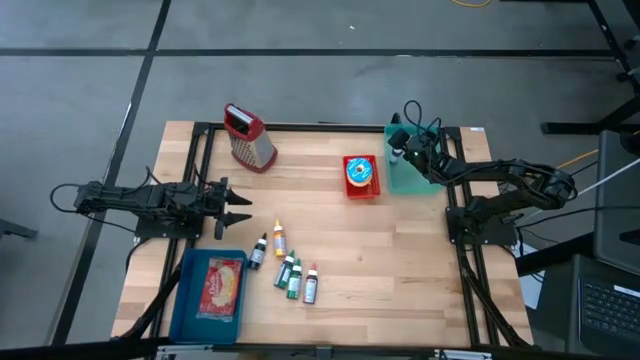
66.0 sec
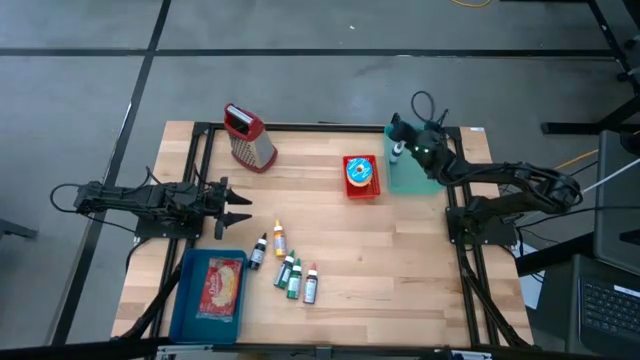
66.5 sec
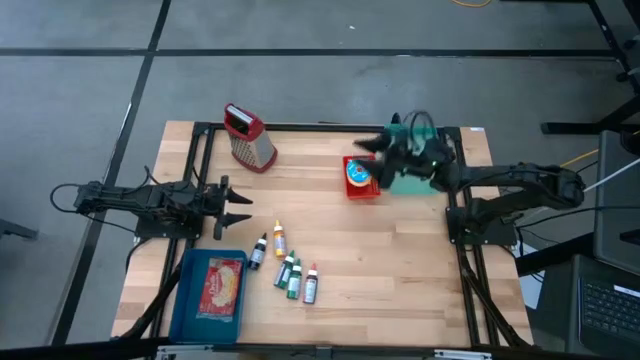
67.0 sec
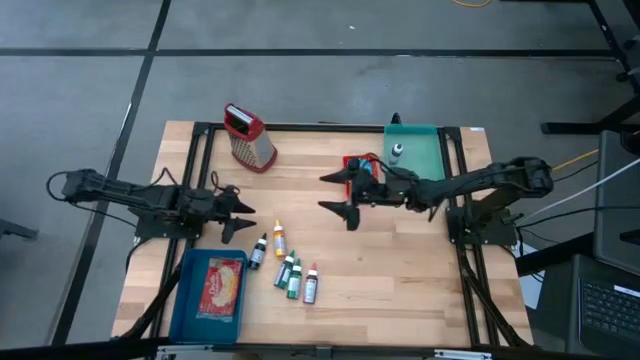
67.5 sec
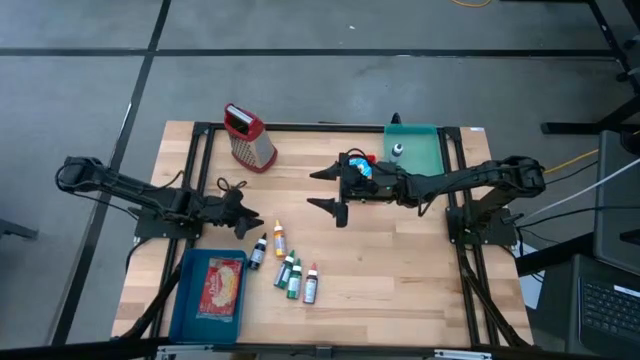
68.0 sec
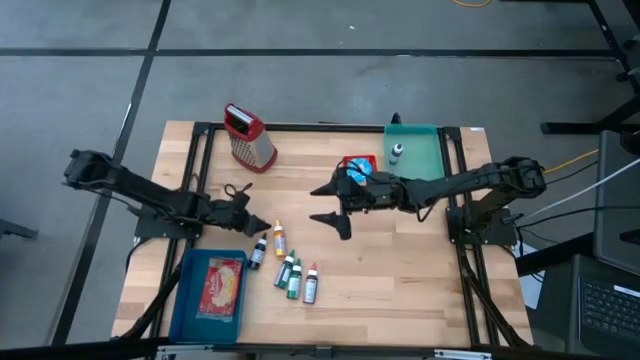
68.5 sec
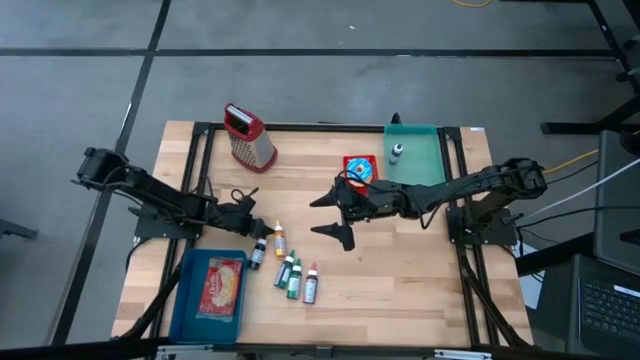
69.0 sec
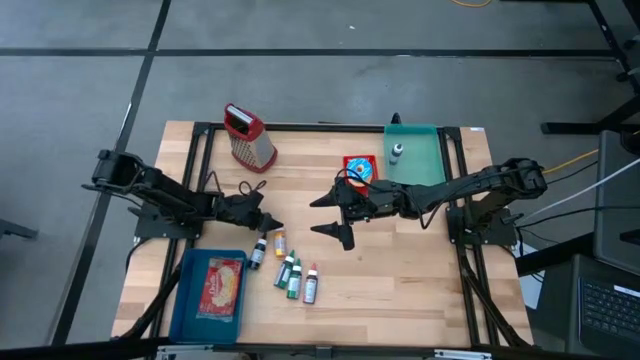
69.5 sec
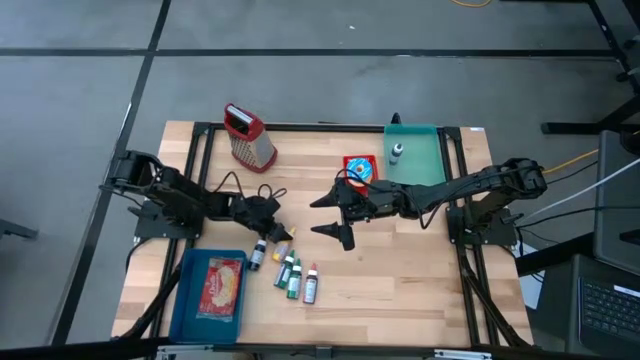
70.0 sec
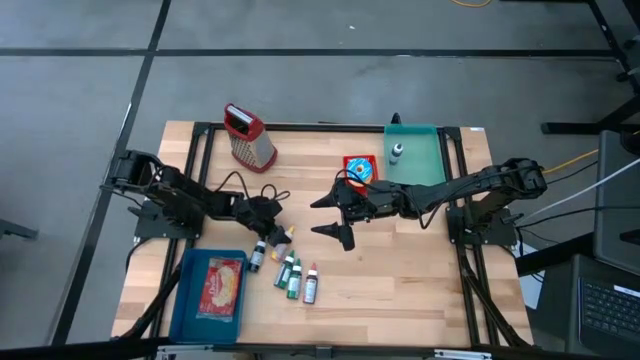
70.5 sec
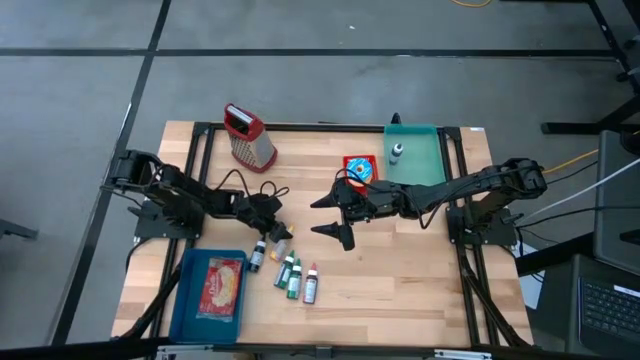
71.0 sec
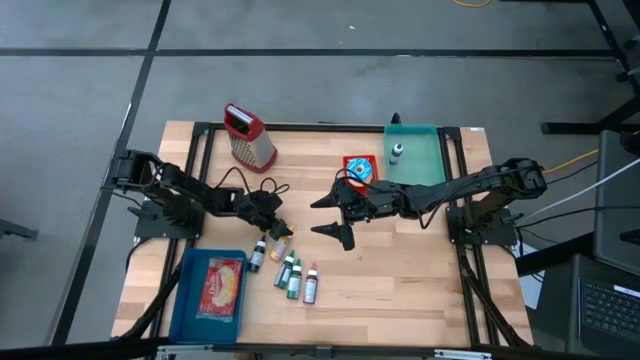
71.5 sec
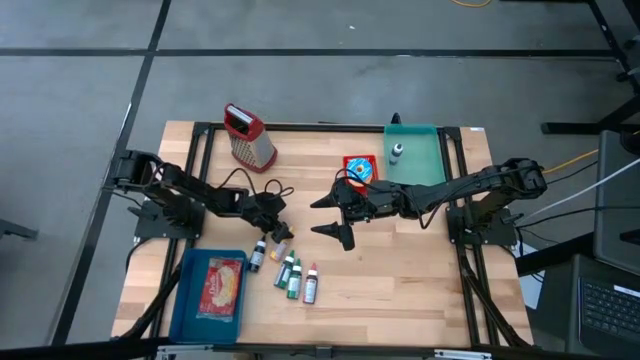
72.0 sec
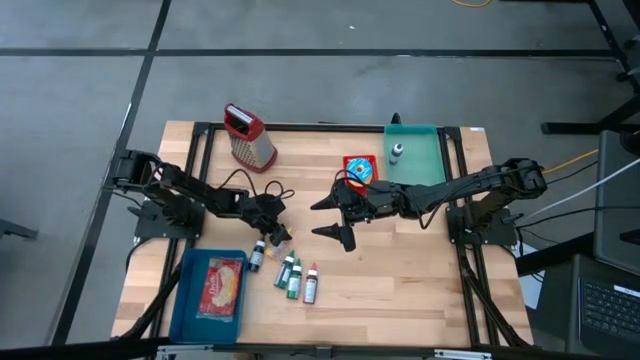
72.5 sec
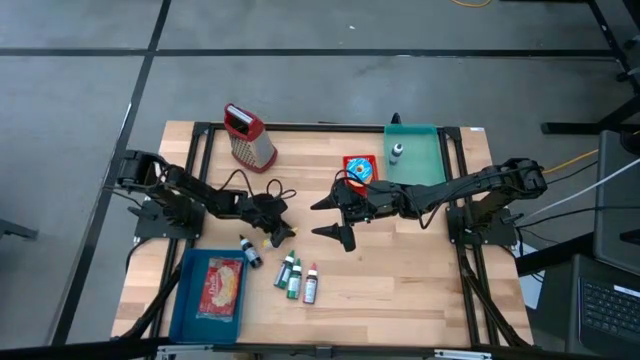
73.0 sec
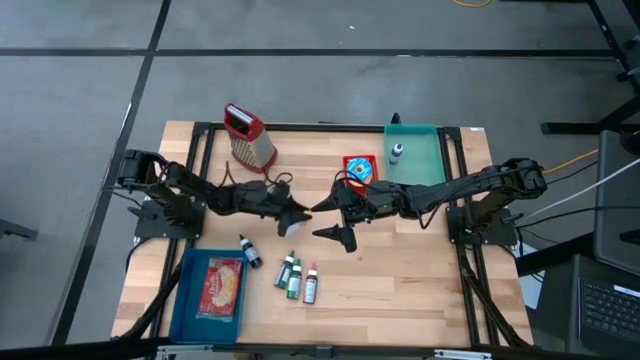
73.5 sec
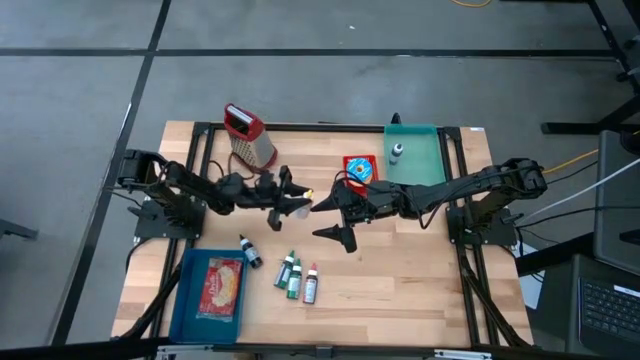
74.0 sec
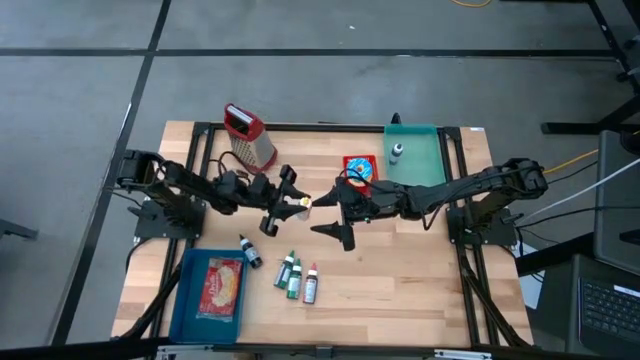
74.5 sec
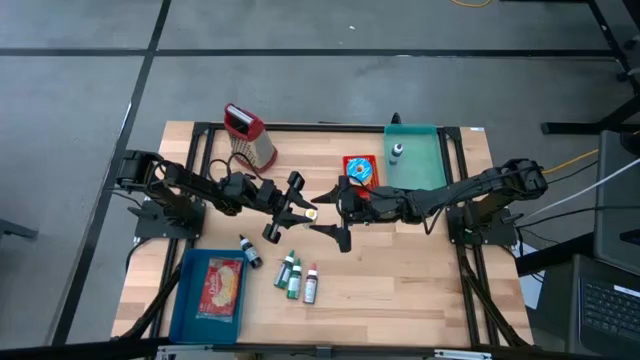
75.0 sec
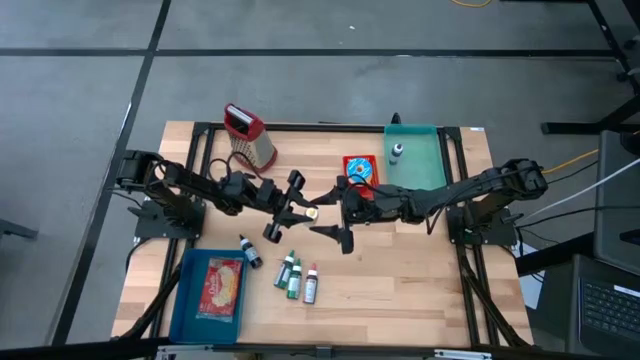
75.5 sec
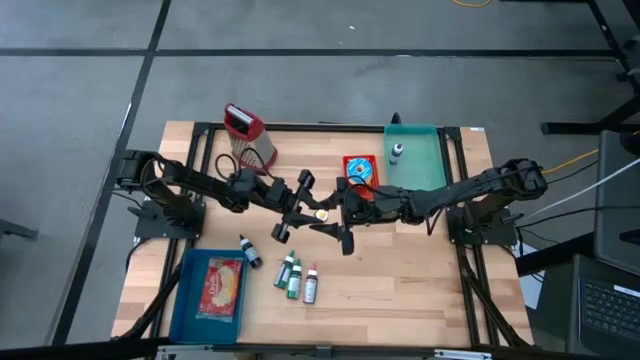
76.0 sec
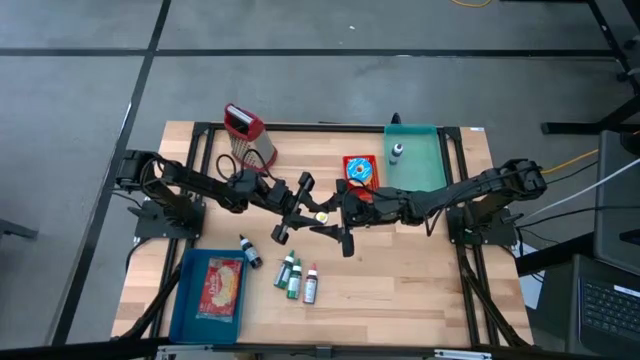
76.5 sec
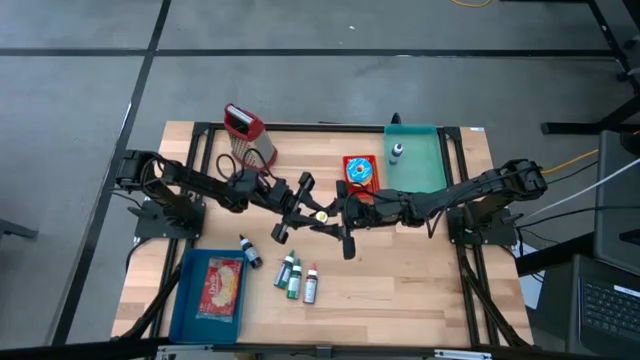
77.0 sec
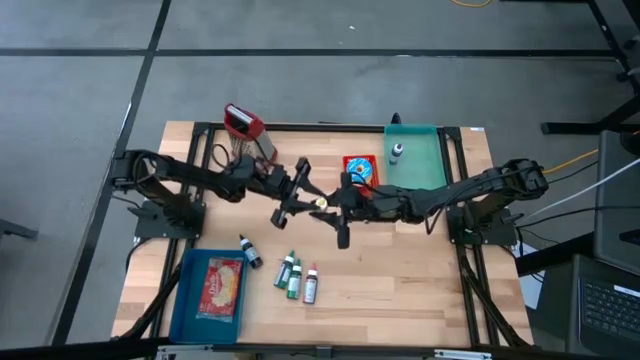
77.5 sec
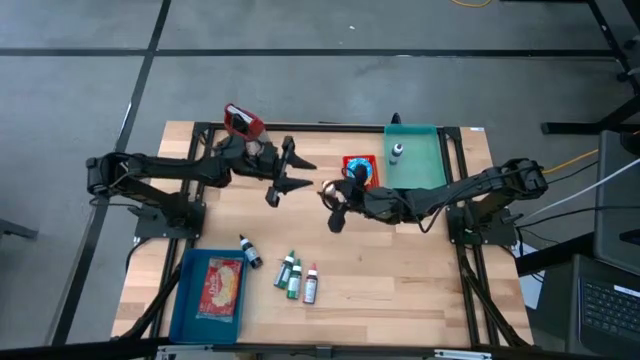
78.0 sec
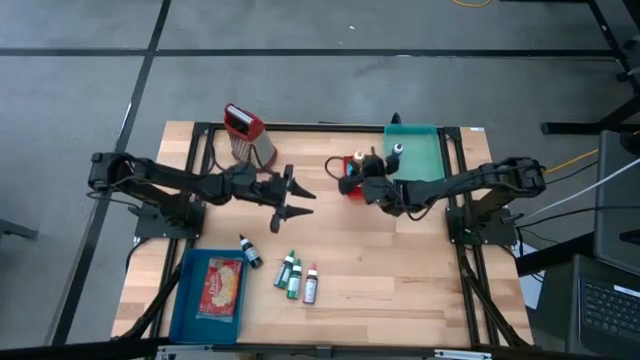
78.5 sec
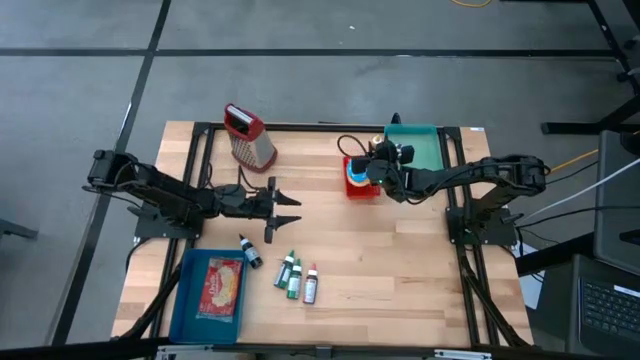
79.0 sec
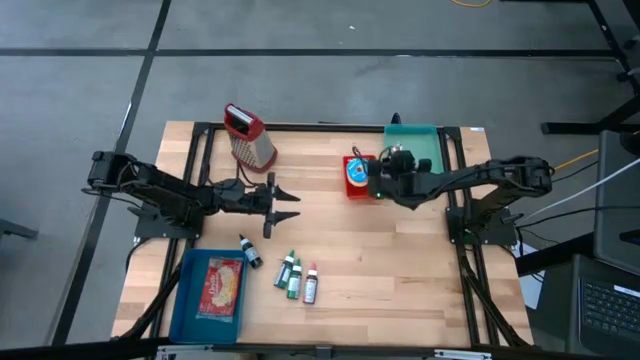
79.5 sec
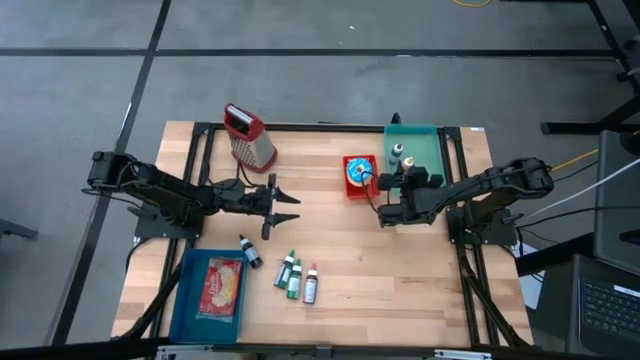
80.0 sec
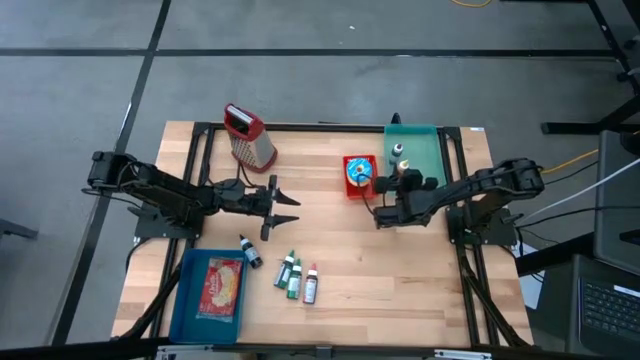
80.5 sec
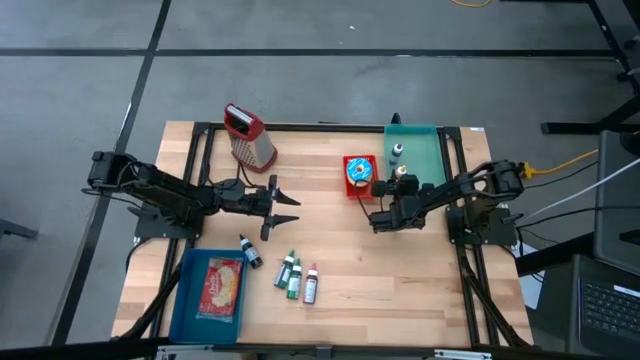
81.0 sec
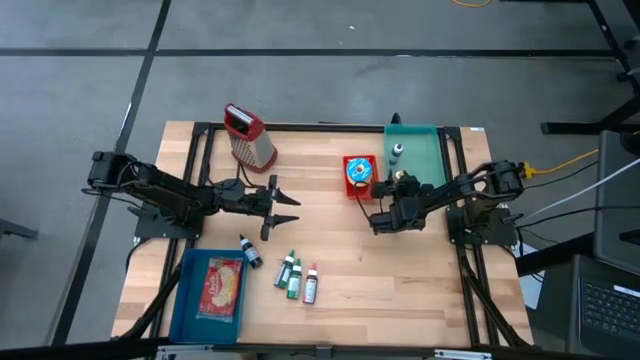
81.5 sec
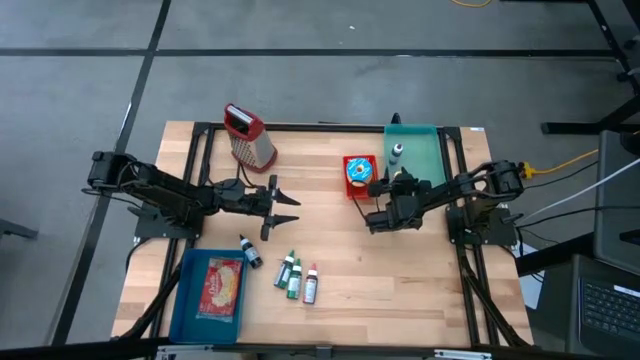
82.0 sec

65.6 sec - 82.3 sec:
Put the yellow food coloring bottle into the green bin

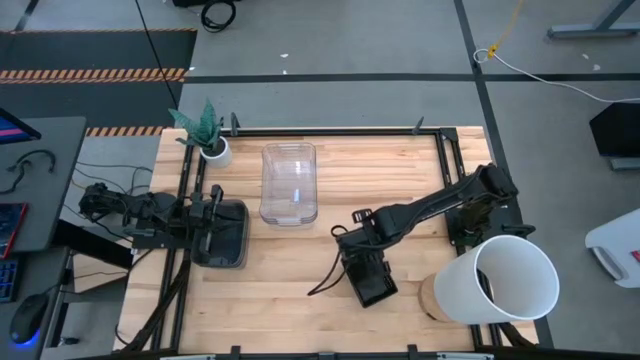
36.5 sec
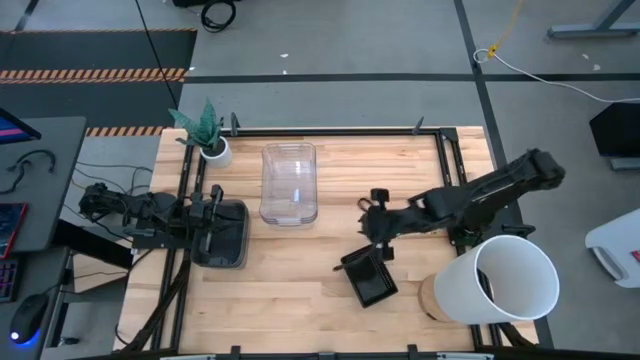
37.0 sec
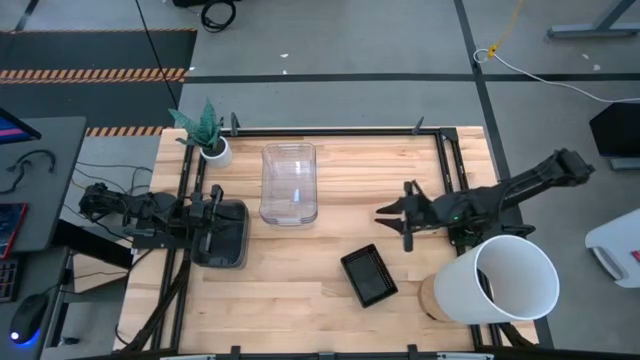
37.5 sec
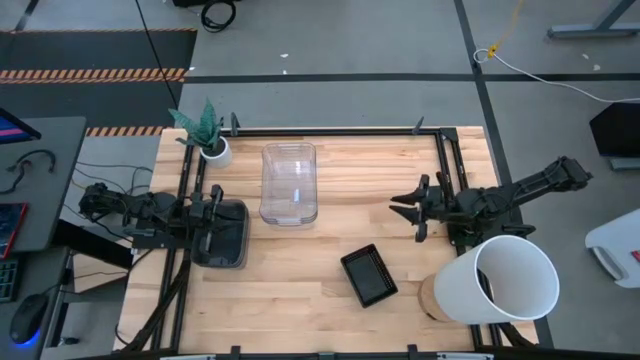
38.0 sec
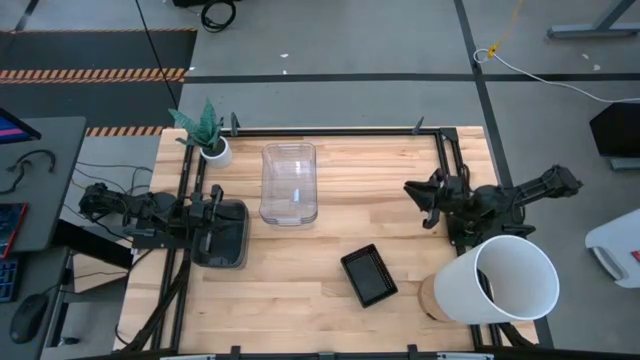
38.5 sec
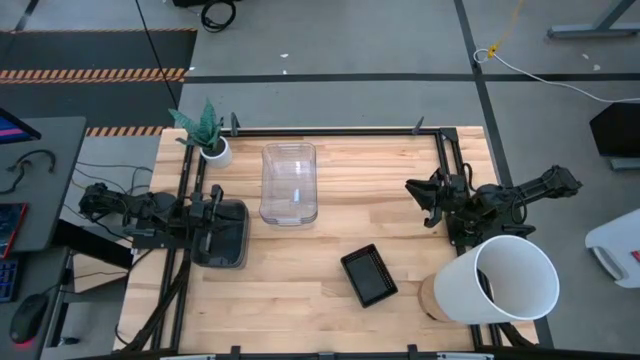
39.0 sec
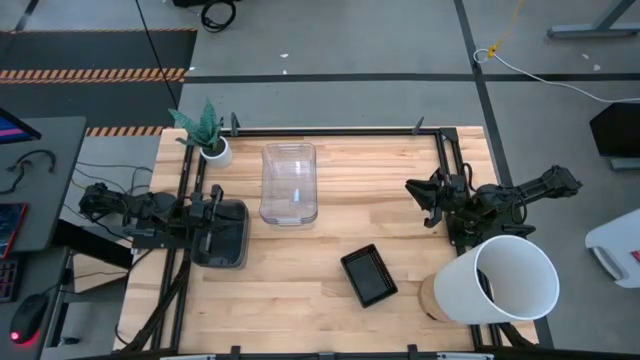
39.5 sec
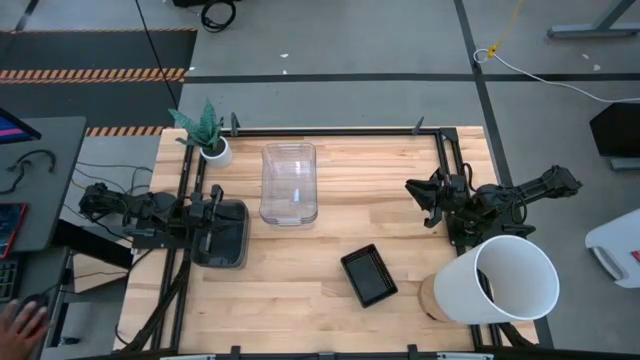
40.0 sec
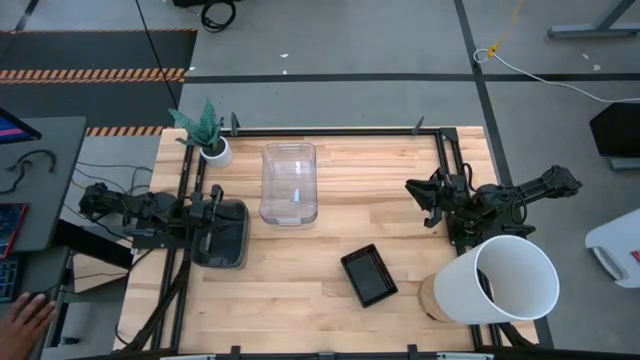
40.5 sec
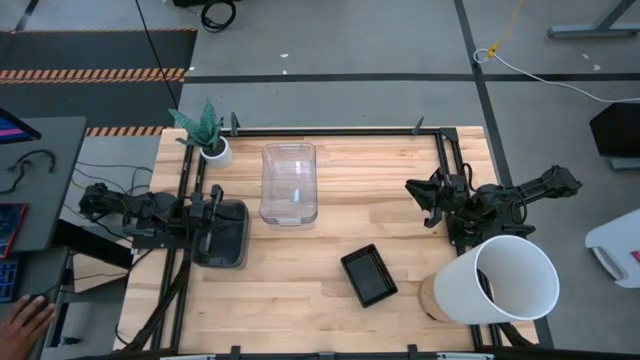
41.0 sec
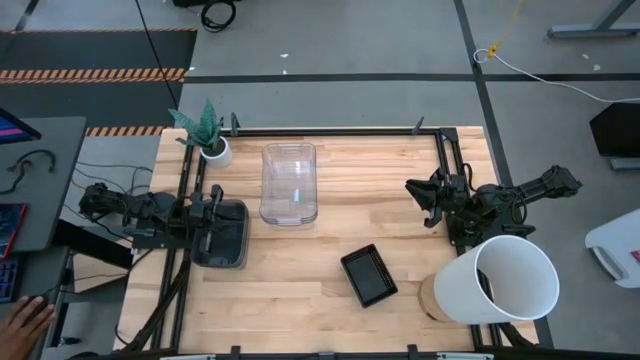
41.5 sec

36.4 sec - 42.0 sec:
Return to Home Position
